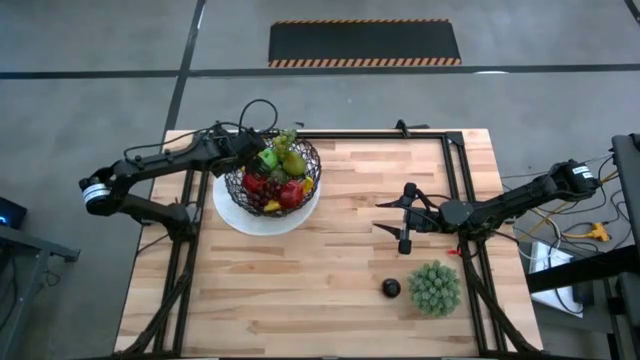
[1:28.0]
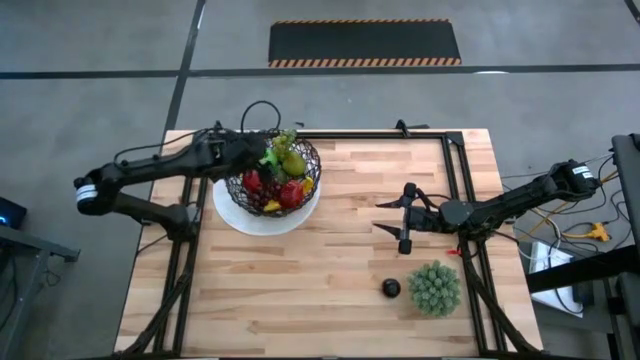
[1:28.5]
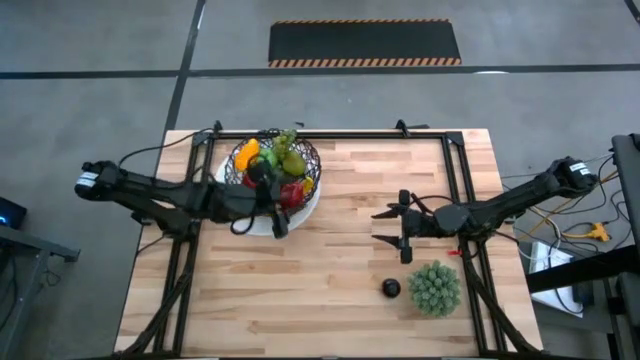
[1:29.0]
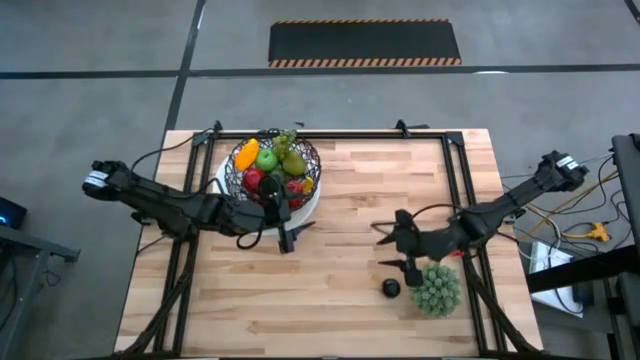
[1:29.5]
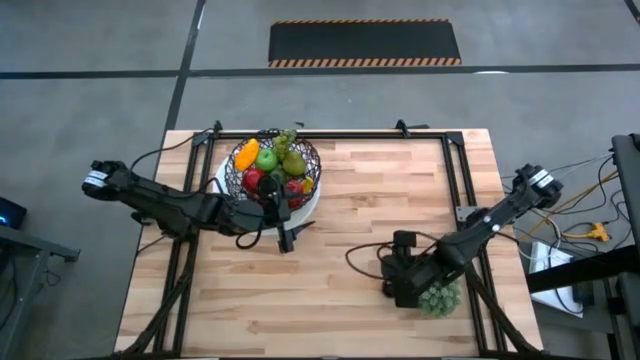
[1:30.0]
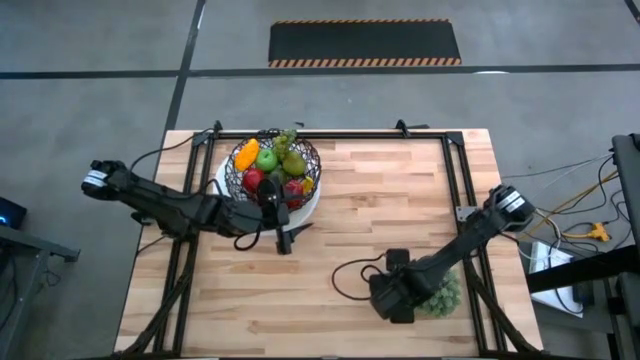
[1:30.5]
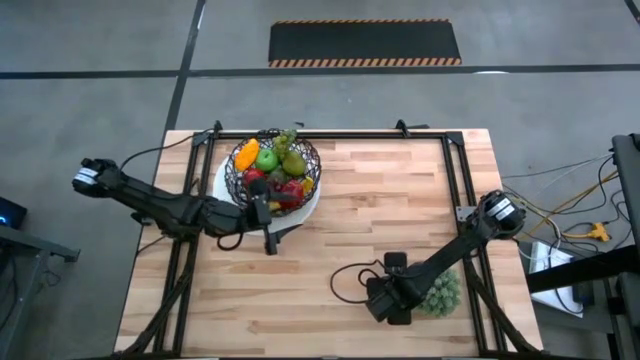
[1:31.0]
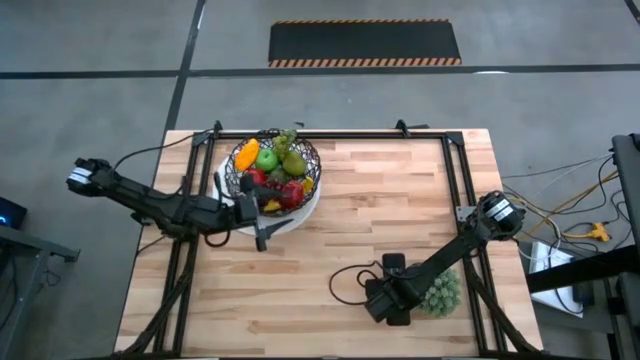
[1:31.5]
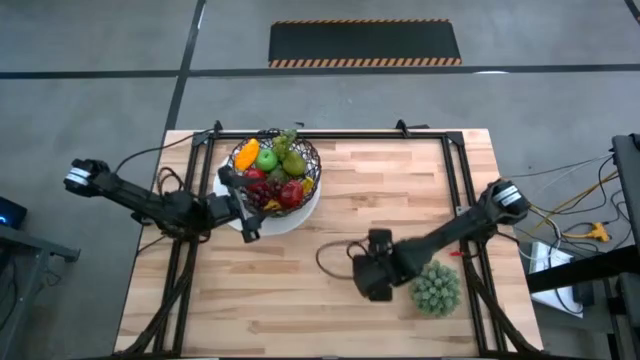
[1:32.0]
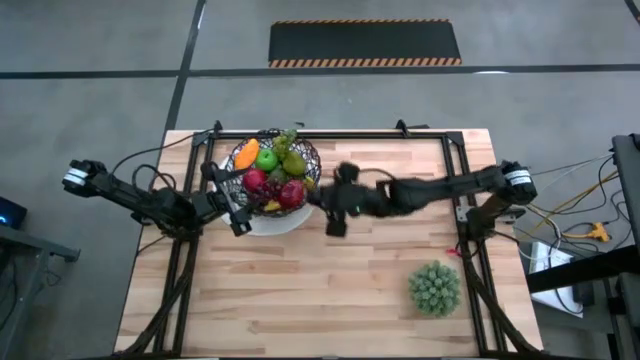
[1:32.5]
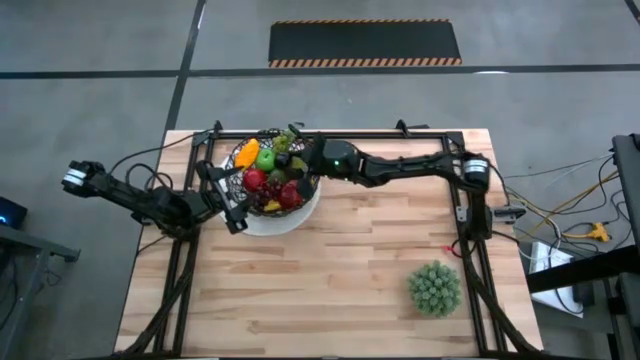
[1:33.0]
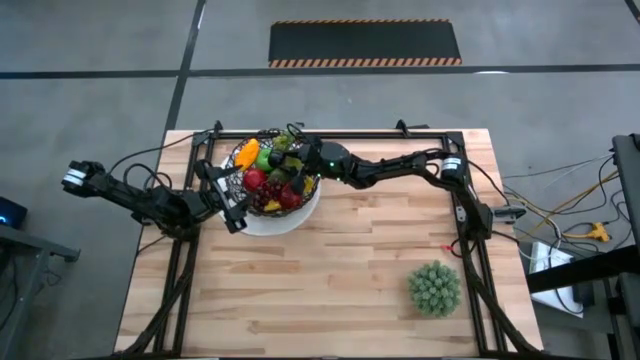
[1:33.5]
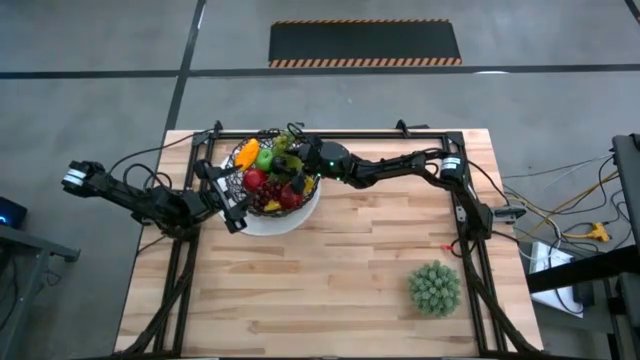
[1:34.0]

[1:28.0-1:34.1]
Task: Build produce basket
Put the plum into the basket

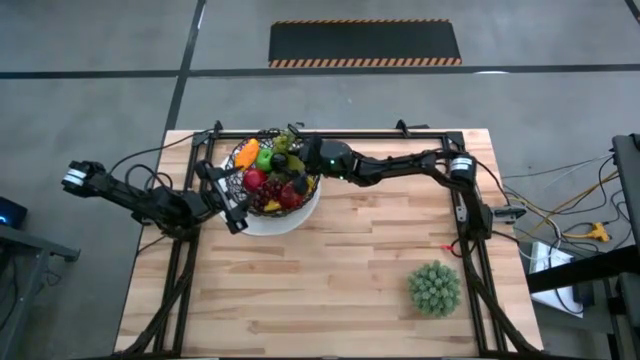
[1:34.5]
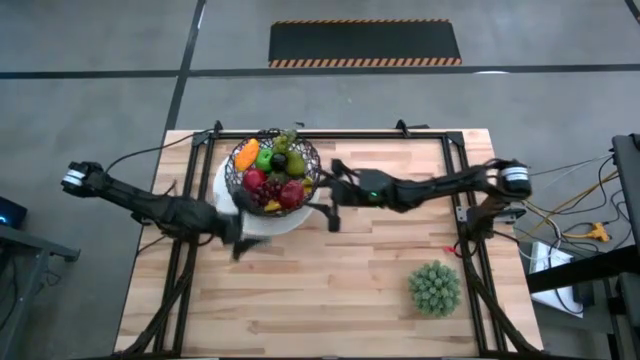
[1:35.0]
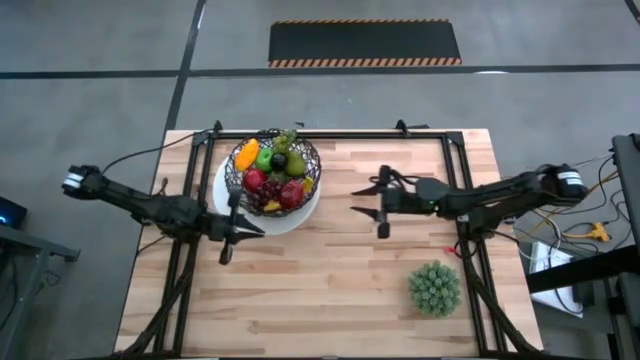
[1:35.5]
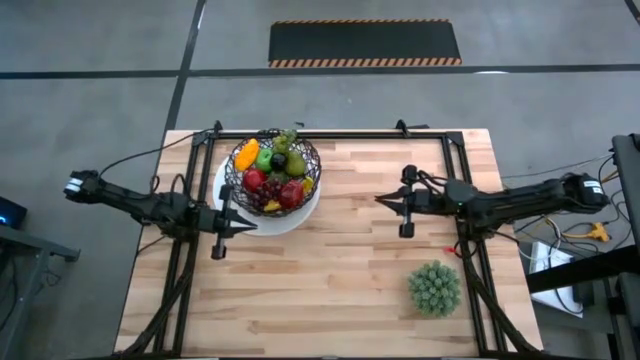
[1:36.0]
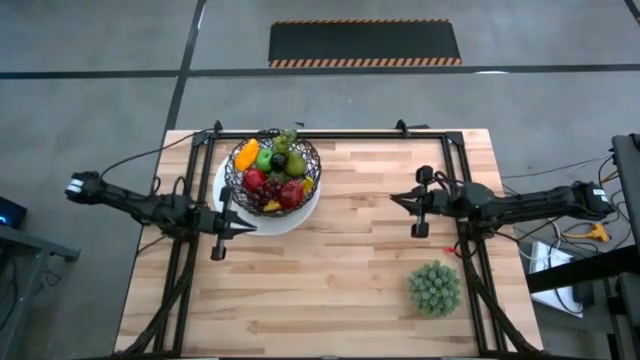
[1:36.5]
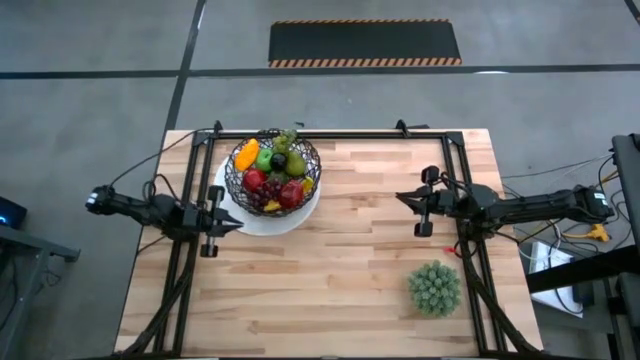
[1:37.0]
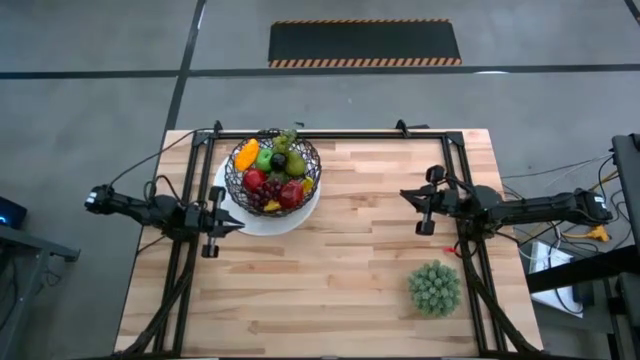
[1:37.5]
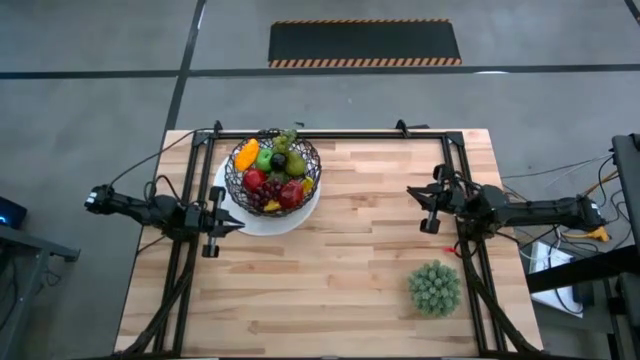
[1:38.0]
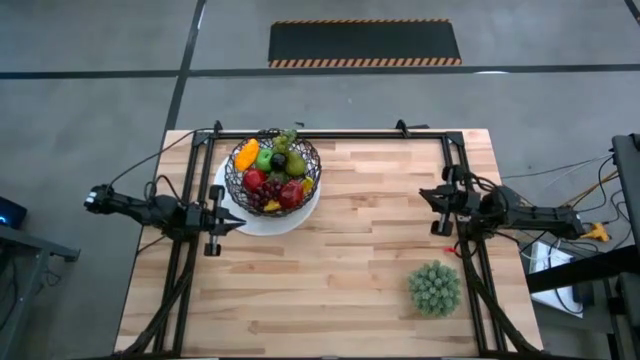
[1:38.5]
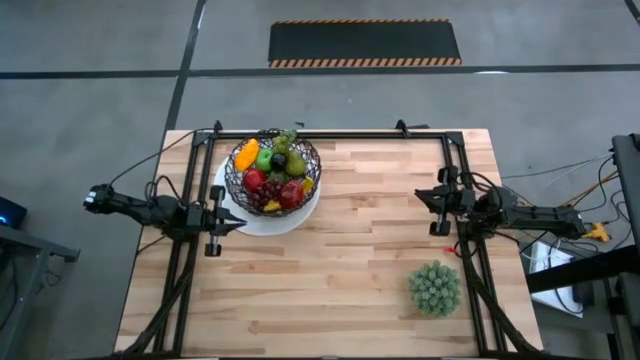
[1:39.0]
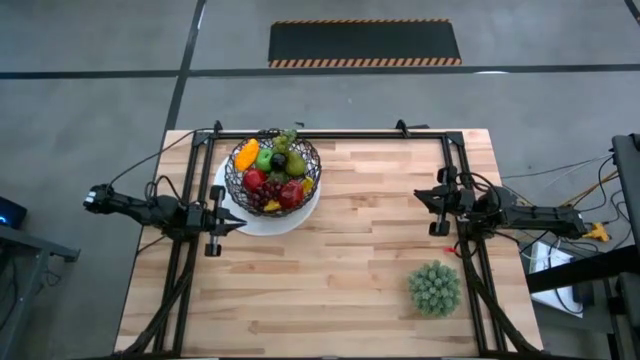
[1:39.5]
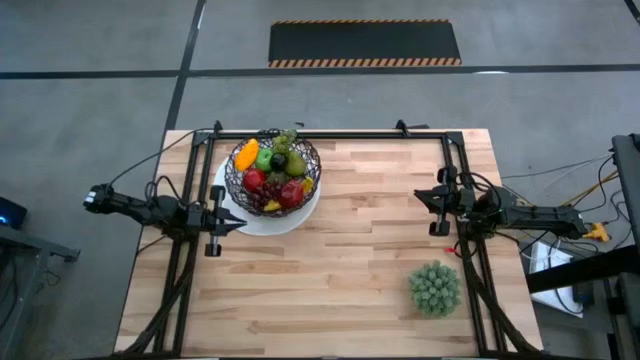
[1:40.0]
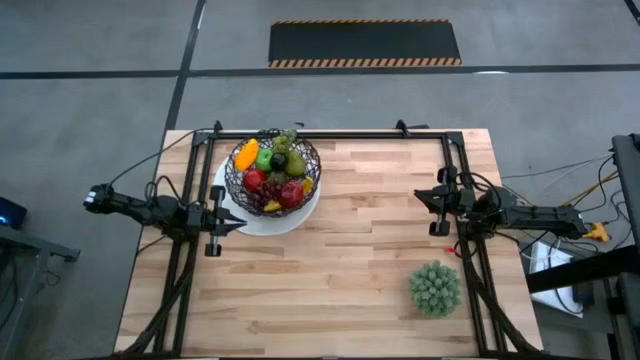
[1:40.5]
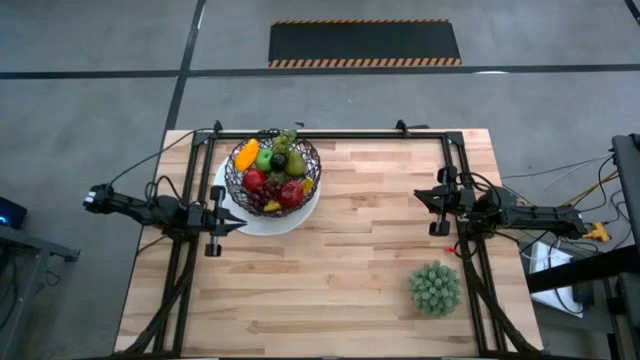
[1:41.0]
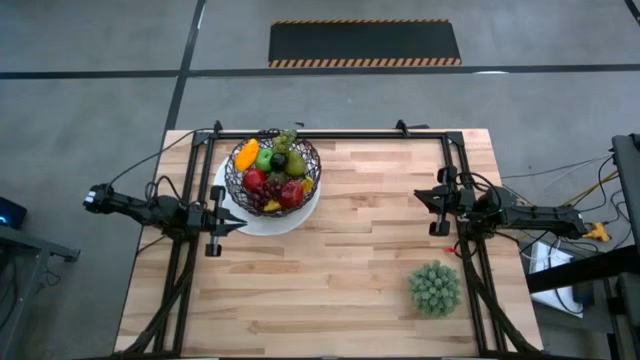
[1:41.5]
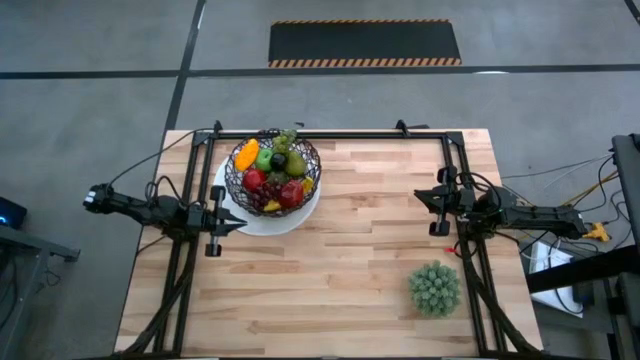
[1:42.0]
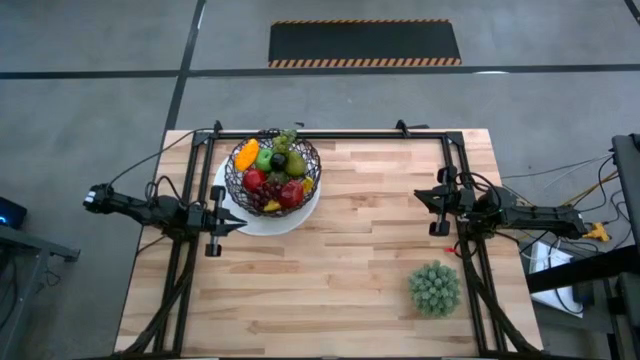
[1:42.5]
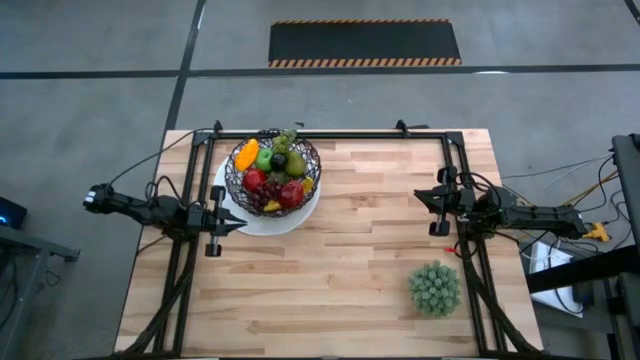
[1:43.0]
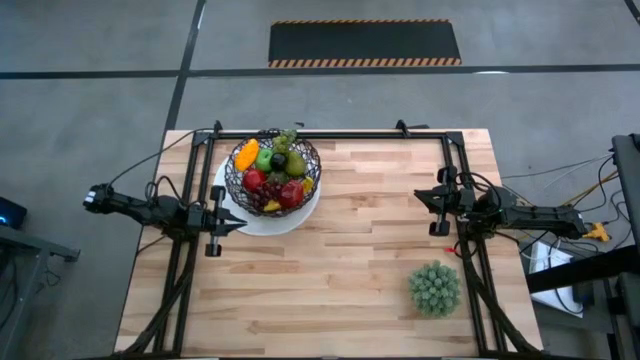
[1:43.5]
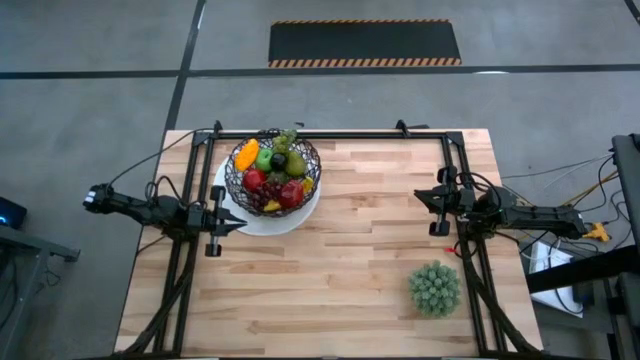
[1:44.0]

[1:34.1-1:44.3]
Return to home Position
